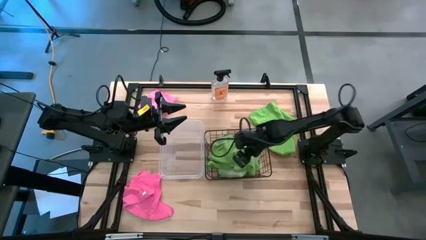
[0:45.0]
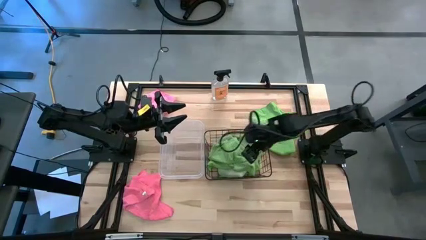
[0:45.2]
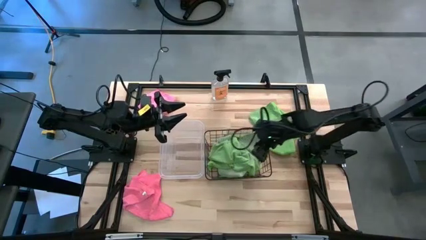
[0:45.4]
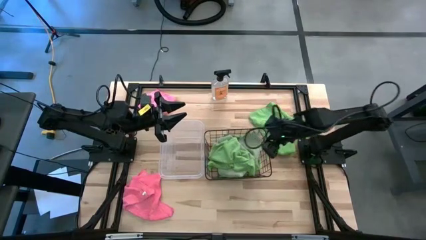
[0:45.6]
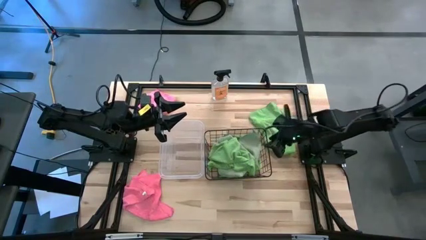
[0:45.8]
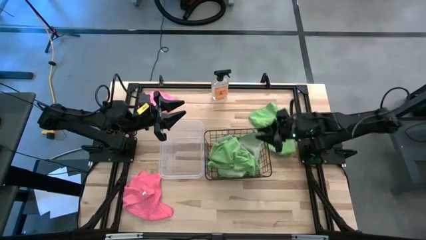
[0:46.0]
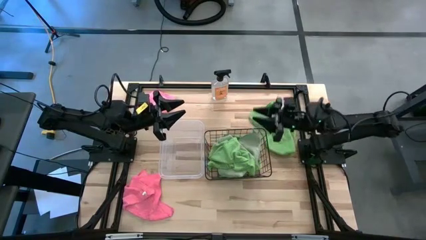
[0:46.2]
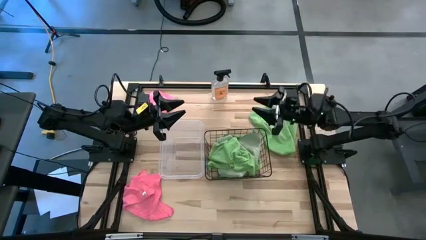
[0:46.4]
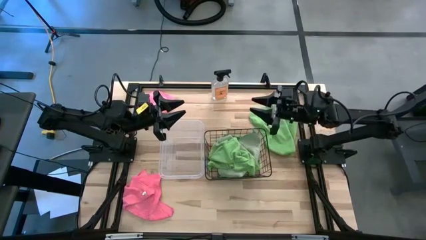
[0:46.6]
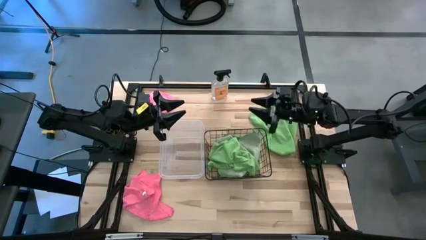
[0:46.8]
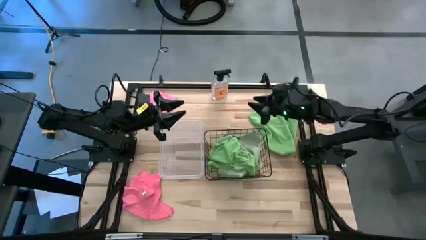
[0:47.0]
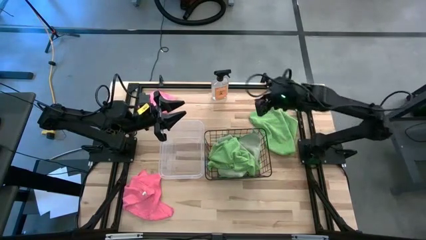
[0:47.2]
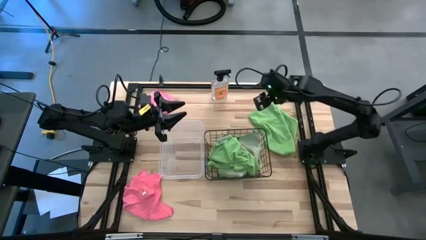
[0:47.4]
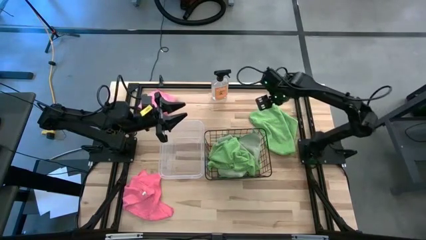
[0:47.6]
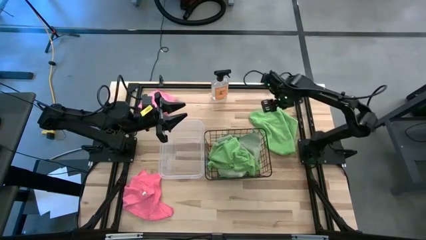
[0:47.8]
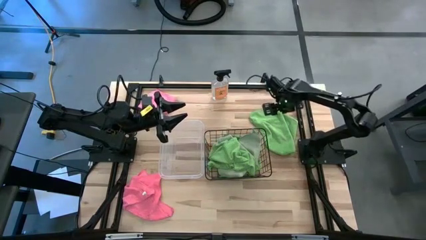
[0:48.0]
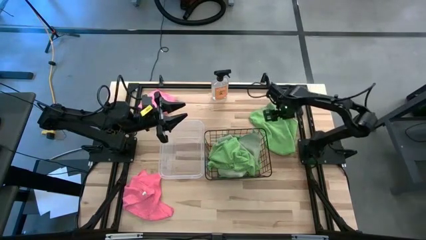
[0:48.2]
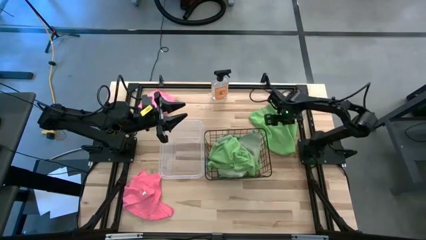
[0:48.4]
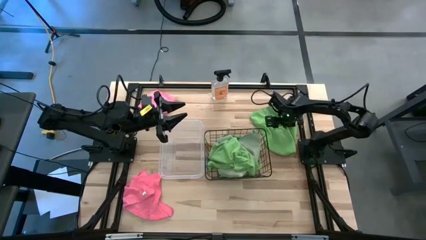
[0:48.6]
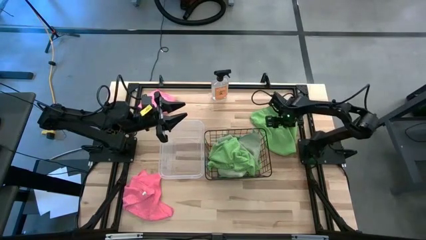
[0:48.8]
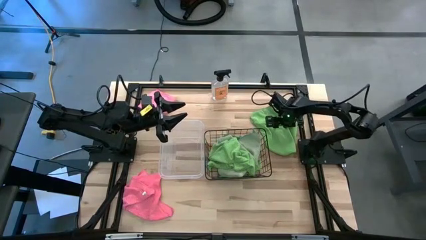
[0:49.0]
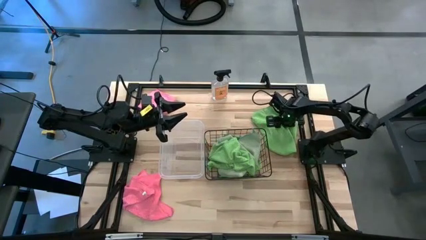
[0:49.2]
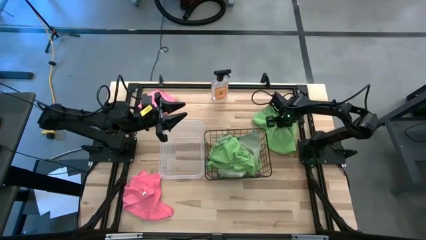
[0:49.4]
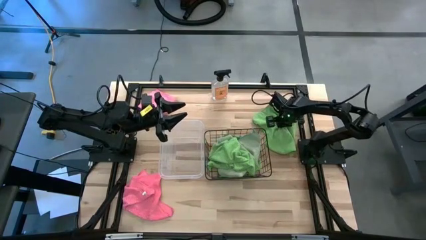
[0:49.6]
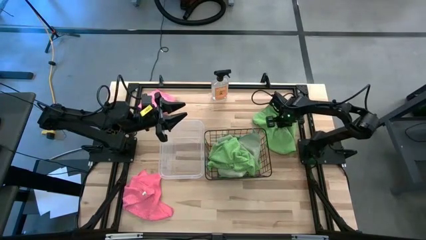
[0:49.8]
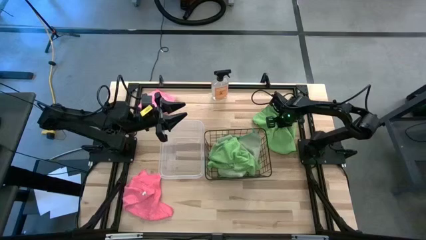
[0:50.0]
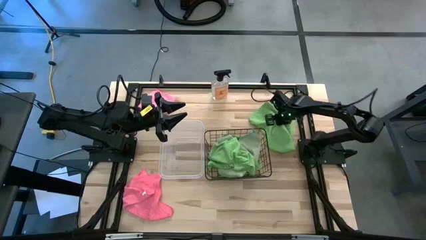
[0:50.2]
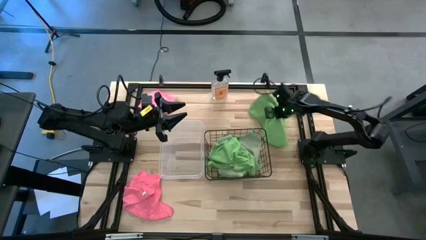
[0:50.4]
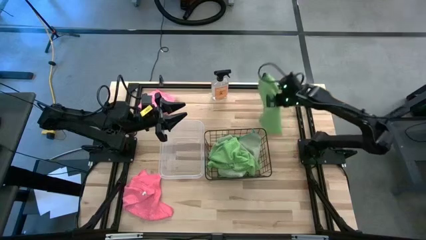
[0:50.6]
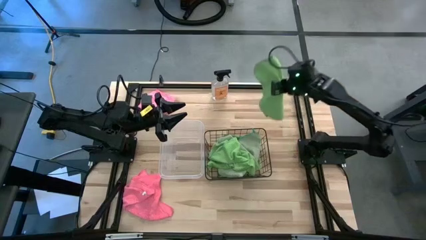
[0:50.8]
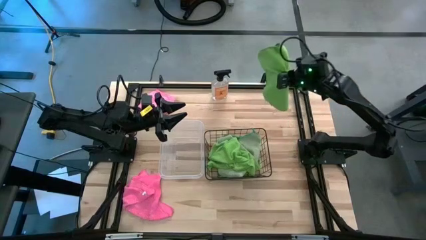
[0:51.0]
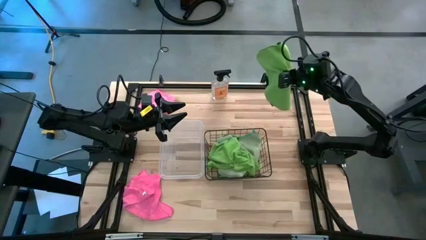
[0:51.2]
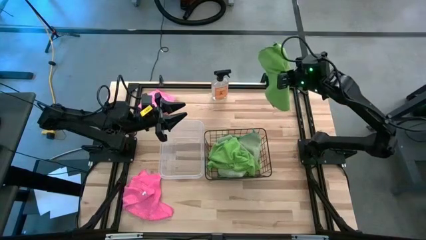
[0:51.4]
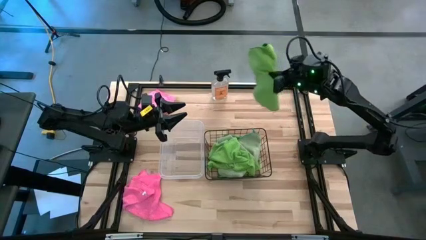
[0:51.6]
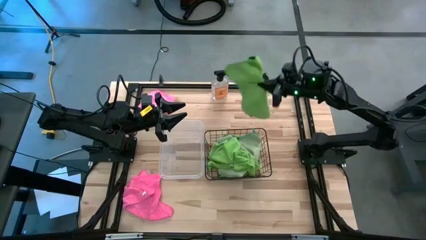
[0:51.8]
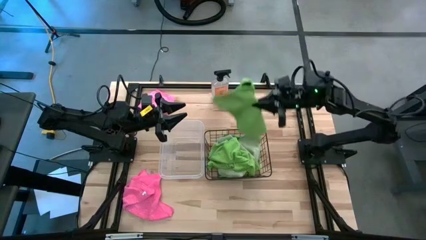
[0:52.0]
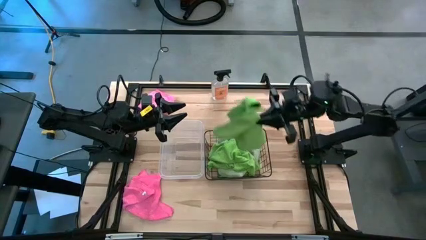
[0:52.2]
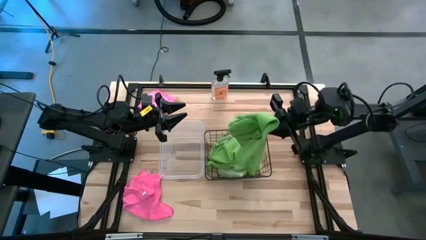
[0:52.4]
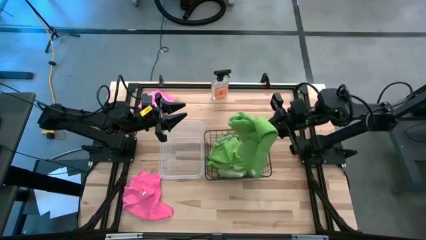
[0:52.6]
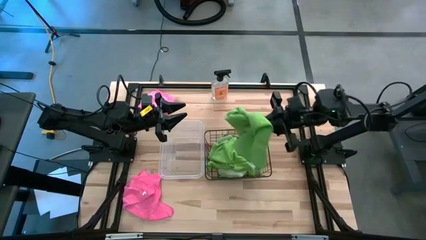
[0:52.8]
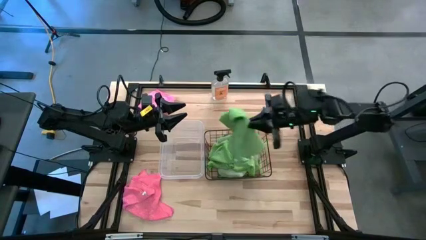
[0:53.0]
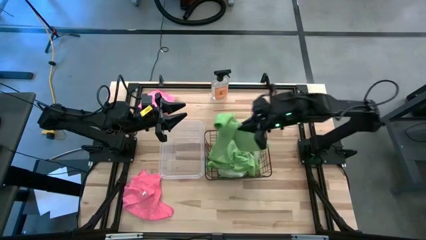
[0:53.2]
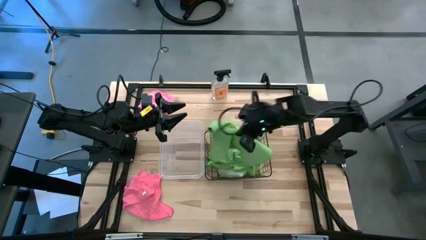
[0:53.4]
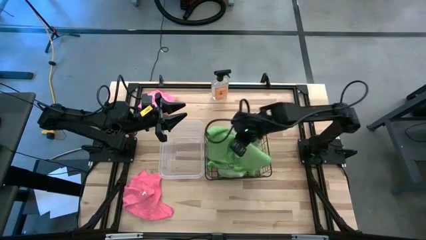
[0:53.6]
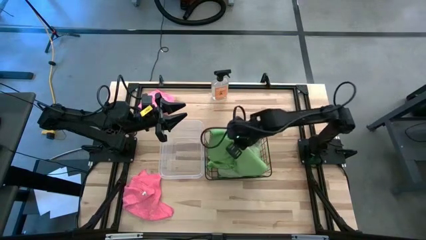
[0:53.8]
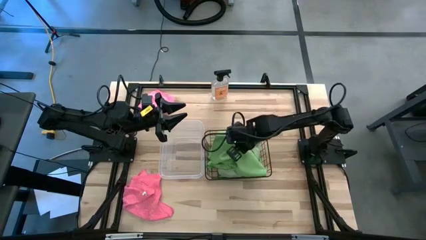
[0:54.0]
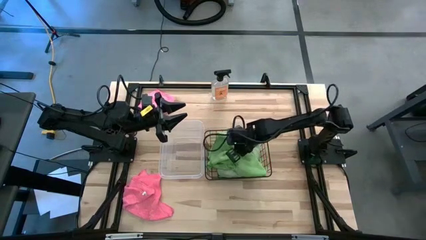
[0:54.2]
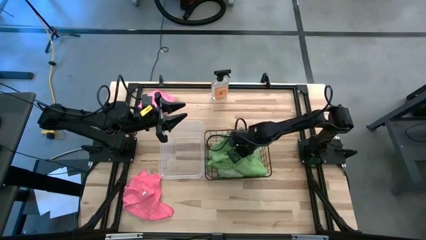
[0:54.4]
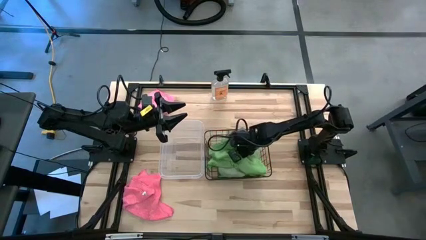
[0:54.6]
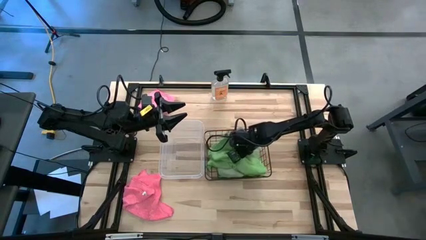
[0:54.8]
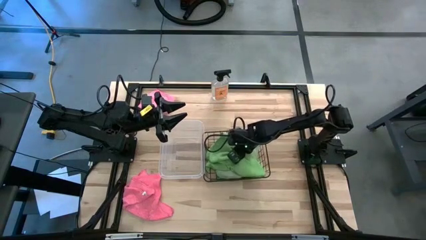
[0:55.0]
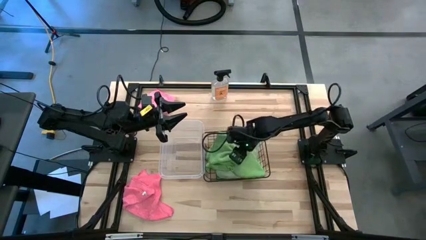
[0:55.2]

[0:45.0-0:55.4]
Task: Sort microfiber towel by color & place in baskets
Put the green towel into the wire basket

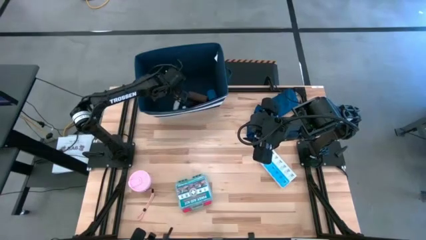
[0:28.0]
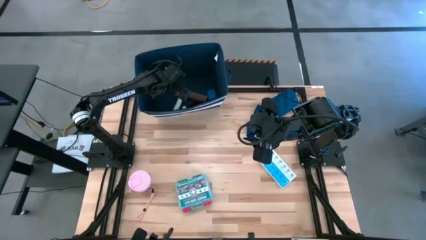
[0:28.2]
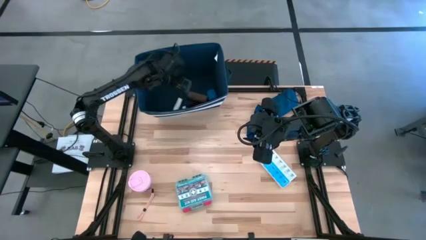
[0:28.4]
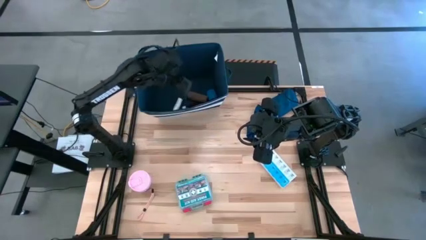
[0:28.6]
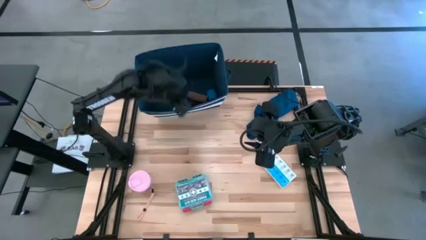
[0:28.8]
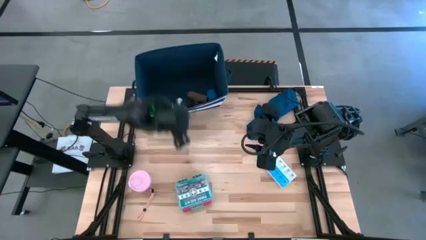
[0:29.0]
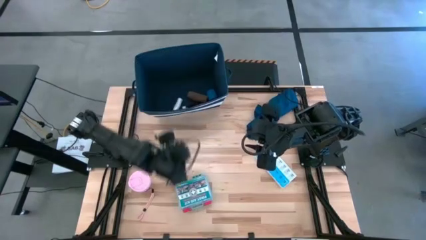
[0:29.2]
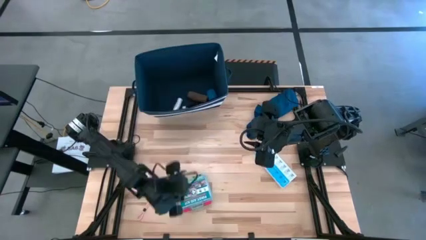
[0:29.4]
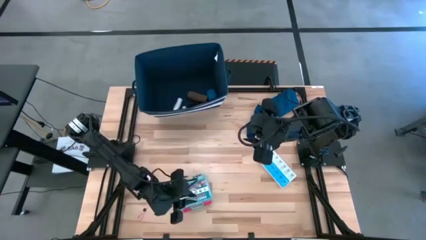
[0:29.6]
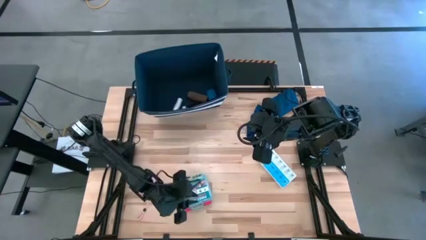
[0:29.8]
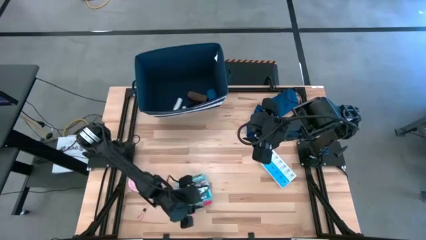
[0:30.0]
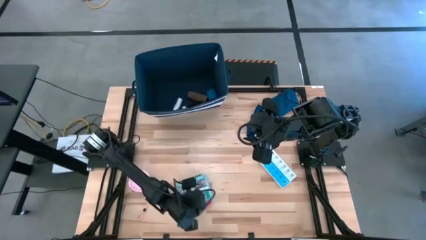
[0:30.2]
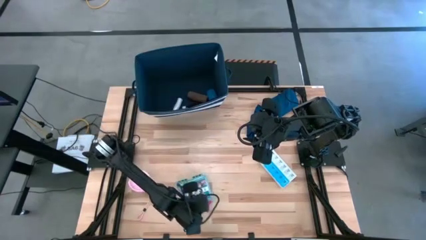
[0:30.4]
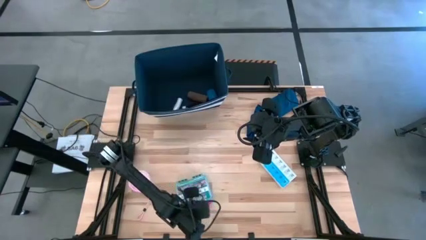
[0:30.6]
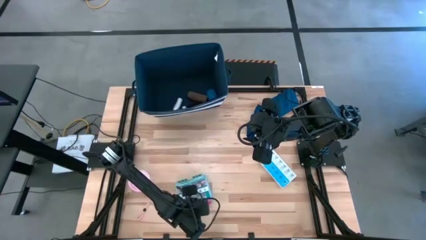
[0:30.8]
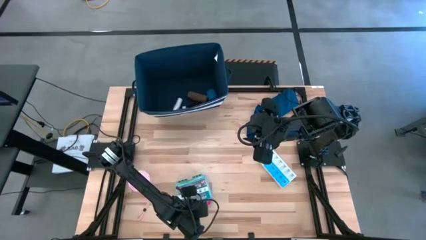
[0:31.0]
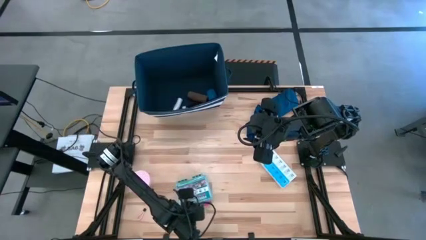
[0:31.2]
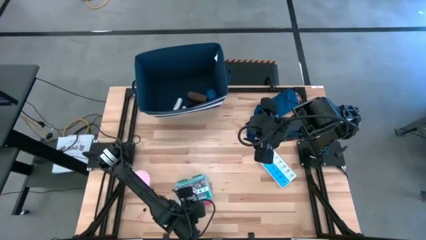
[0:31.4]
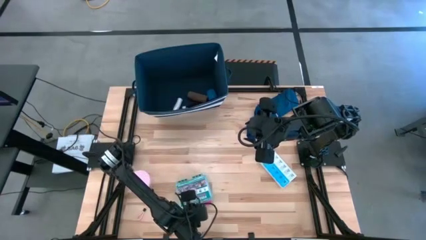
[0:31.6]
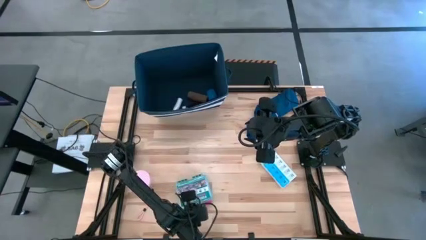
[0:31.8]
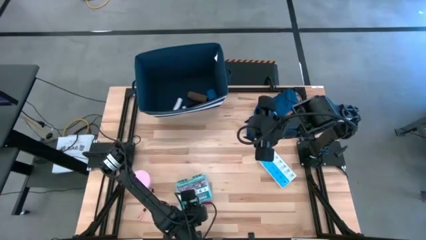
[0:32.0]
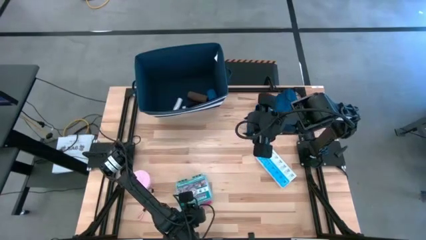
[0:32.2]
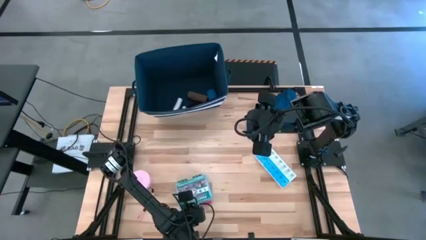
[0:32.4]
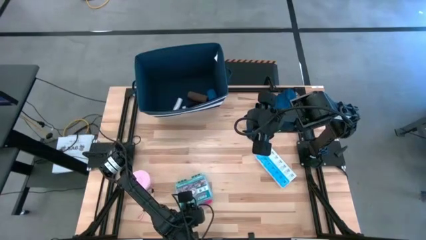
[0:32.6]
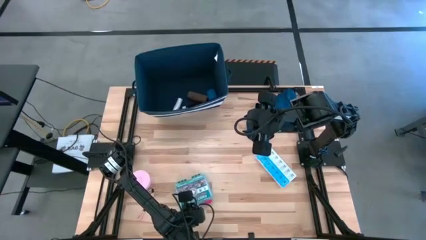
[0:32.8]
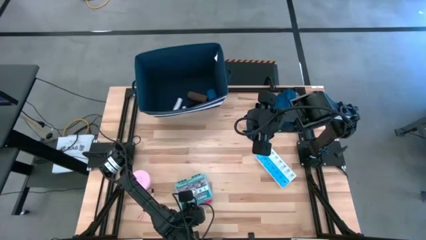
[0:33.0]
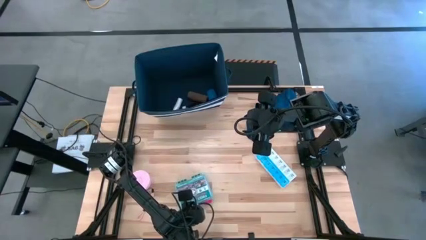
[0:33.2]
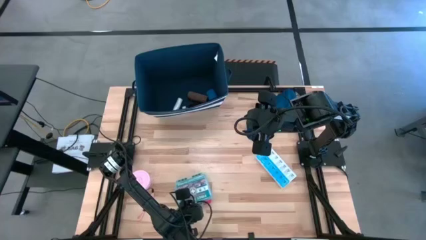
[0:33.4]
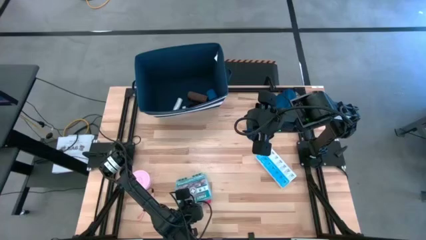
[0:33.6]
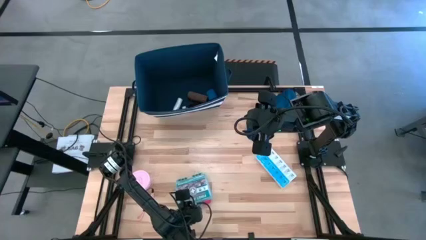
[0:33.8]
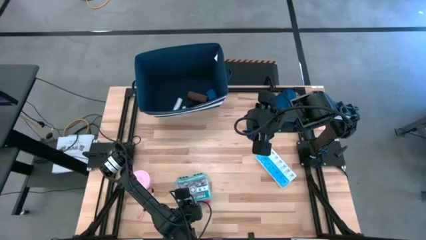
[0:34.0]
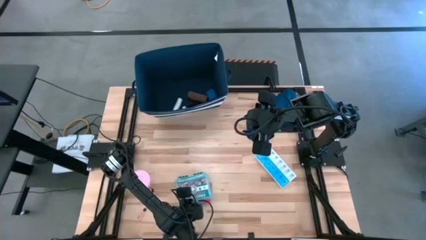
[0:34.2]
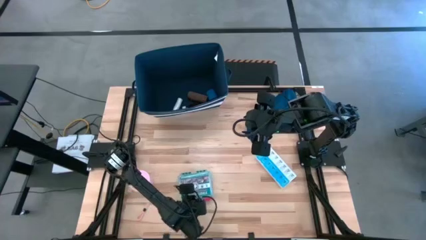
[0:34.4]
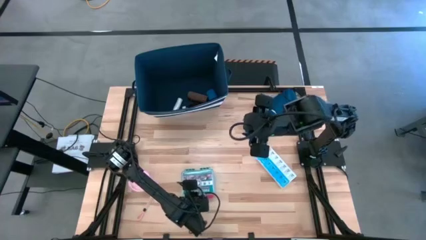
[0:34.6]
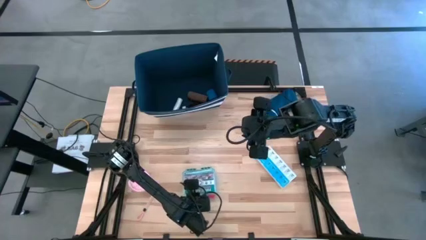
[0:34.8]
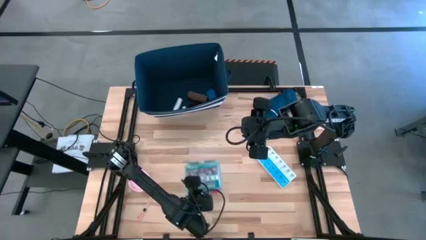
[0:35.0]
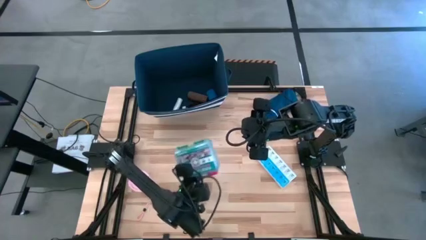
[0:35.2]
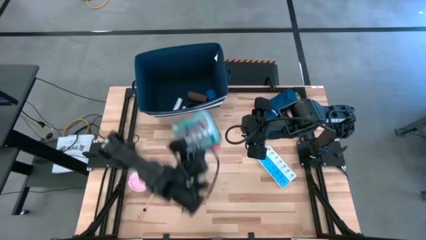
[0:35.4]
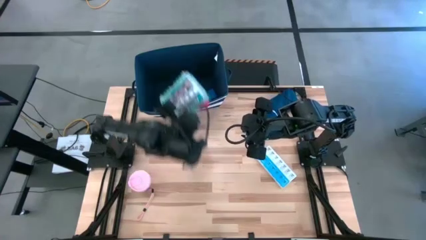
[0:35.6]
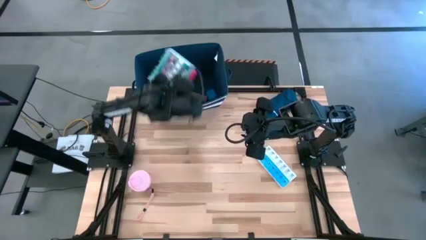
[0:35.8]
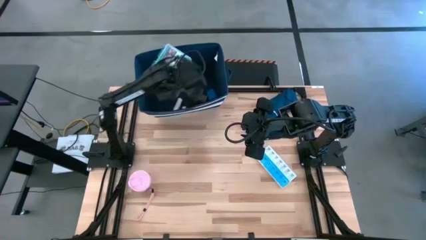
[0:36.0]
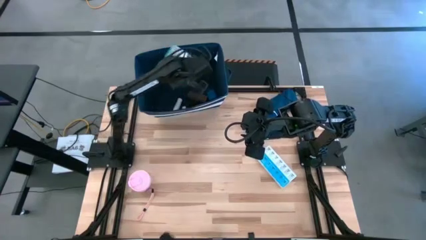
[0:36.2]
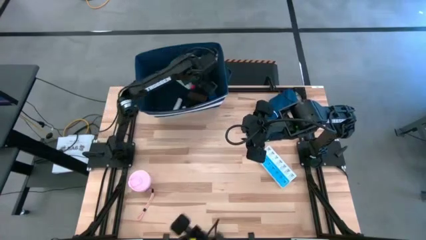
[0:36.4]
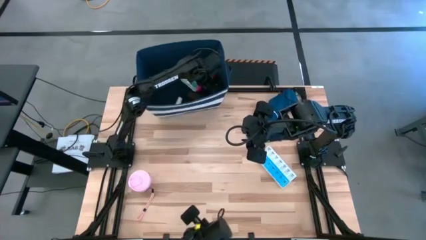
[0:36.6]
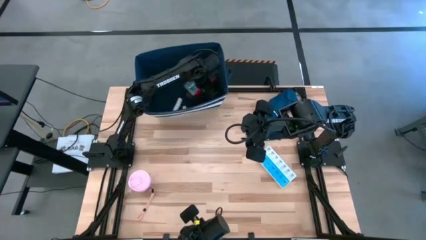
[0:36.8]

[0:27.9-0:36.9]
Task: Pick & place medical supplies in basket/bin
Put the blue first aid box into the blue bin
